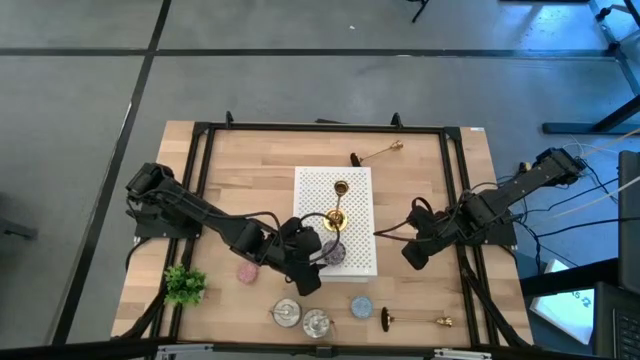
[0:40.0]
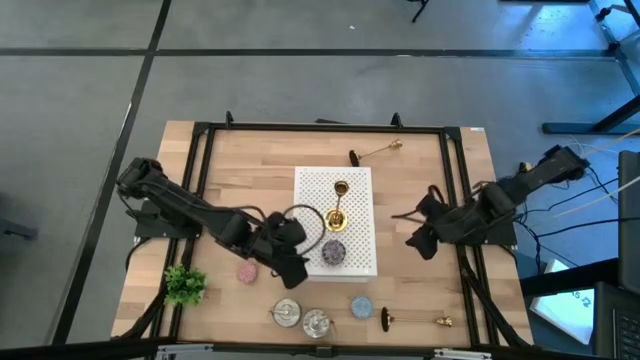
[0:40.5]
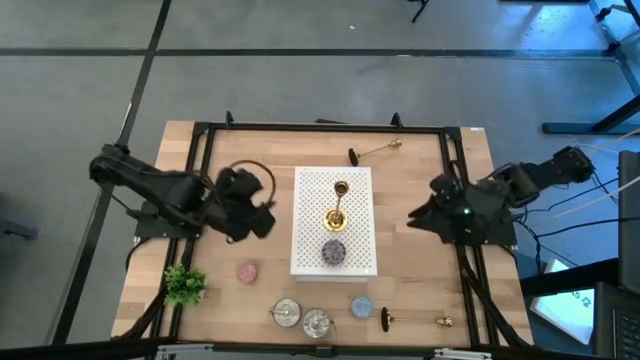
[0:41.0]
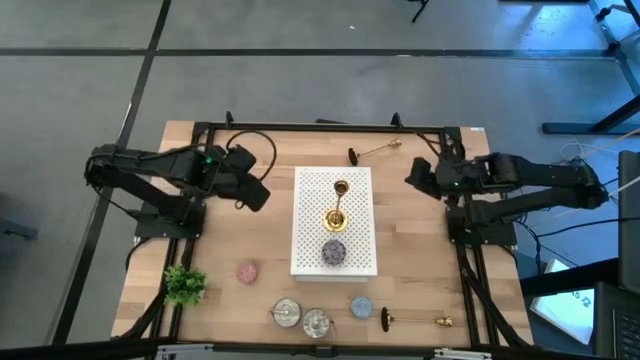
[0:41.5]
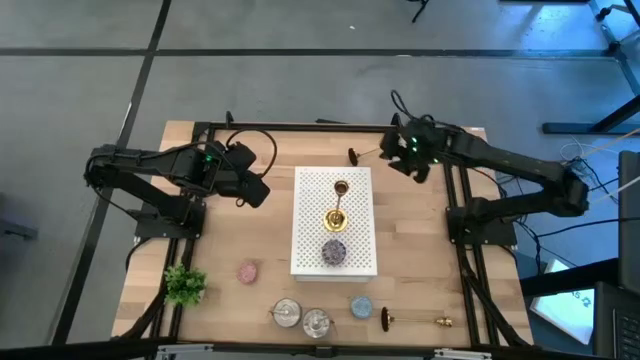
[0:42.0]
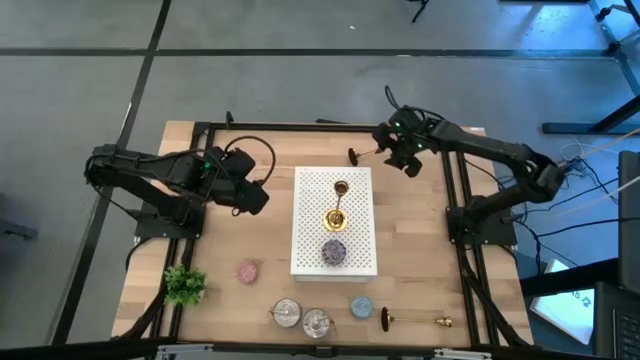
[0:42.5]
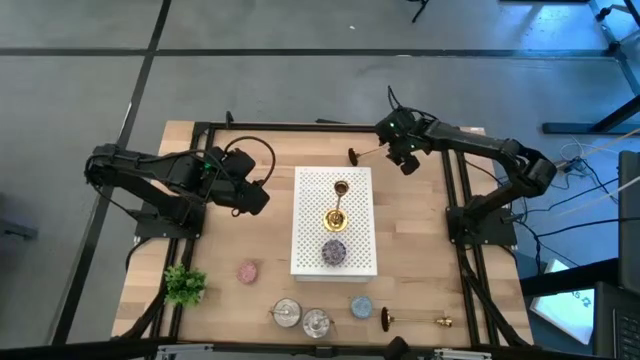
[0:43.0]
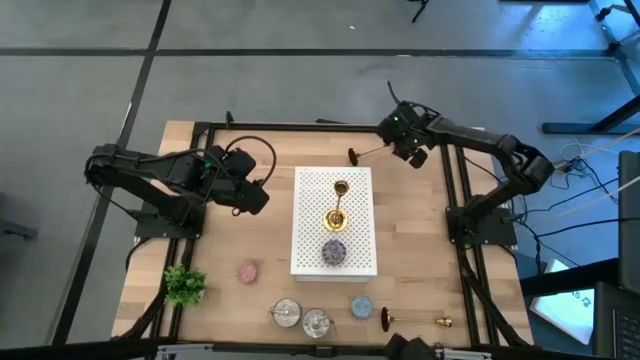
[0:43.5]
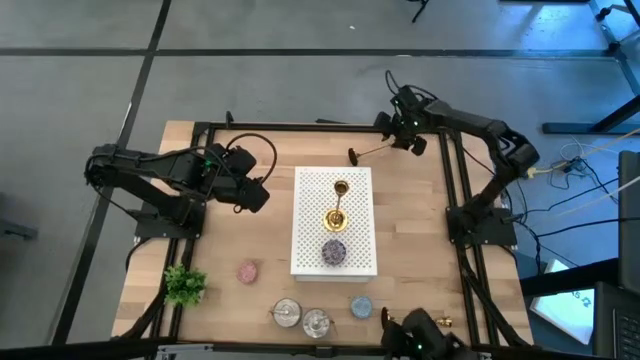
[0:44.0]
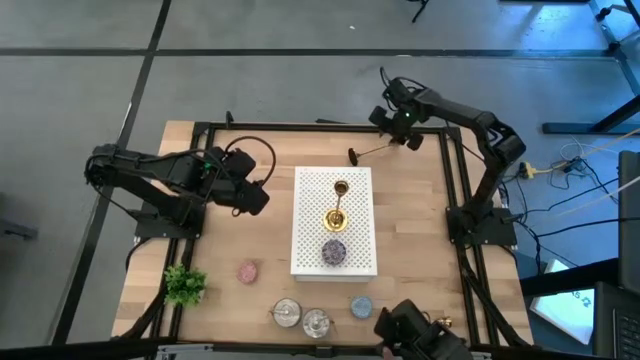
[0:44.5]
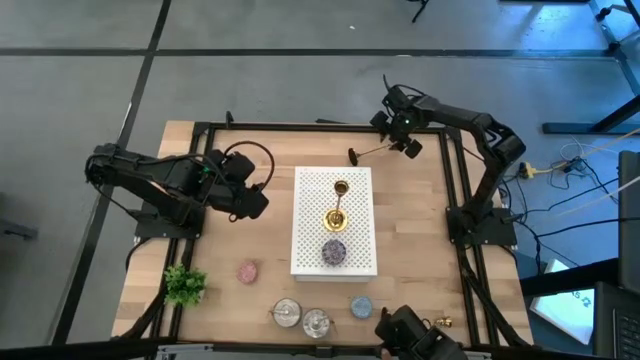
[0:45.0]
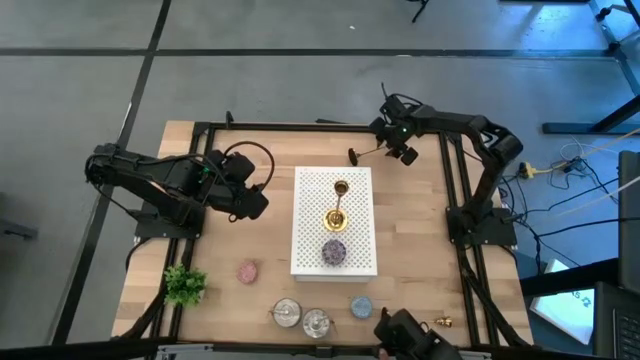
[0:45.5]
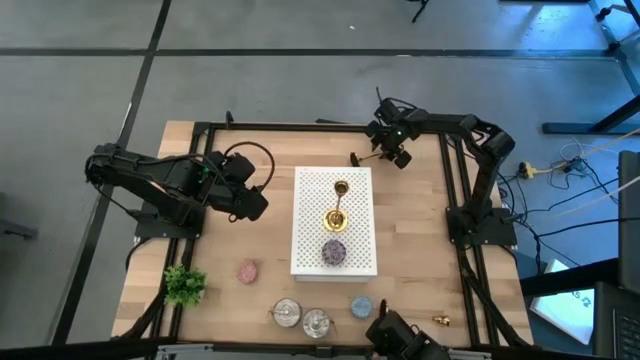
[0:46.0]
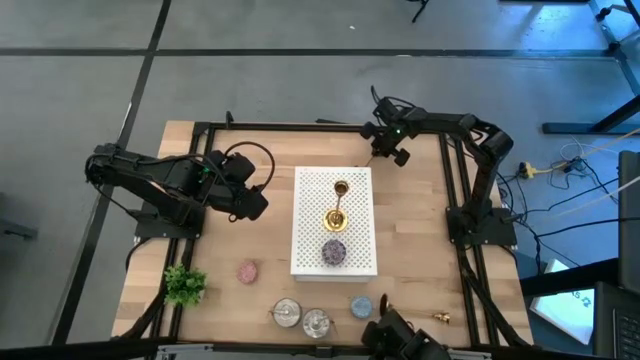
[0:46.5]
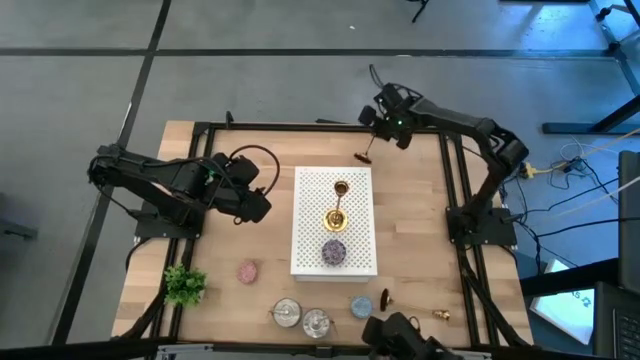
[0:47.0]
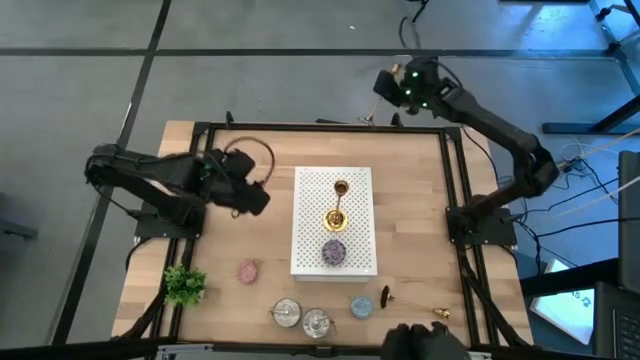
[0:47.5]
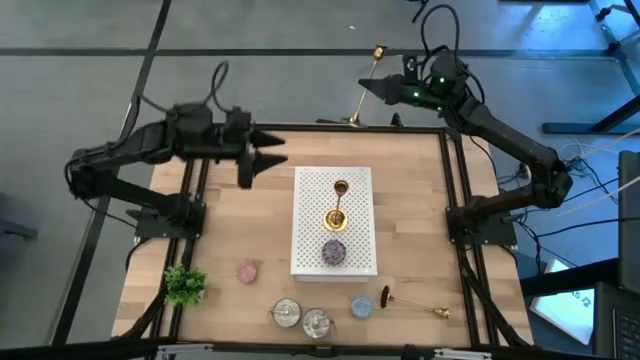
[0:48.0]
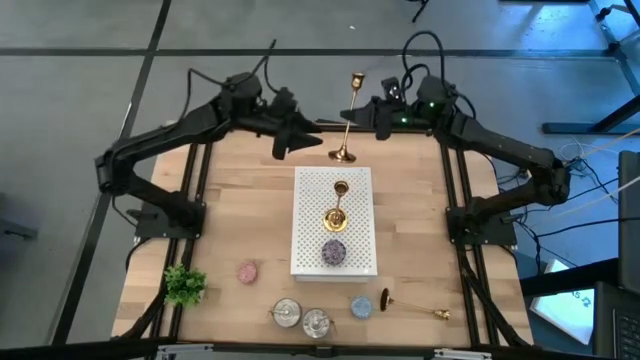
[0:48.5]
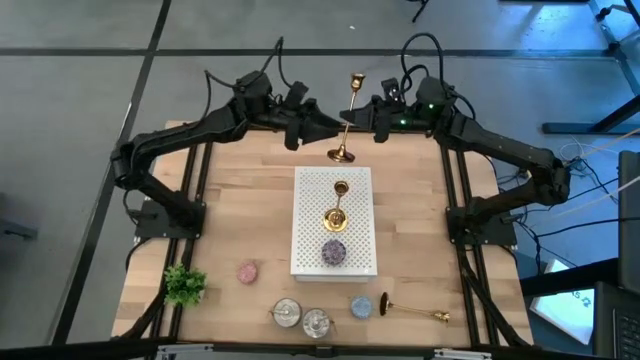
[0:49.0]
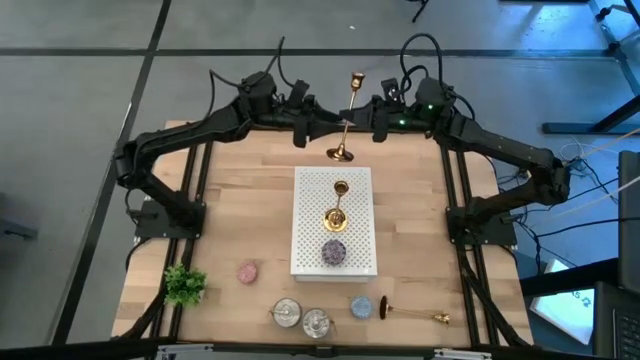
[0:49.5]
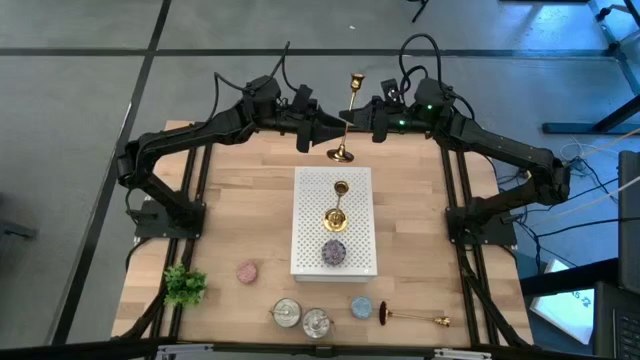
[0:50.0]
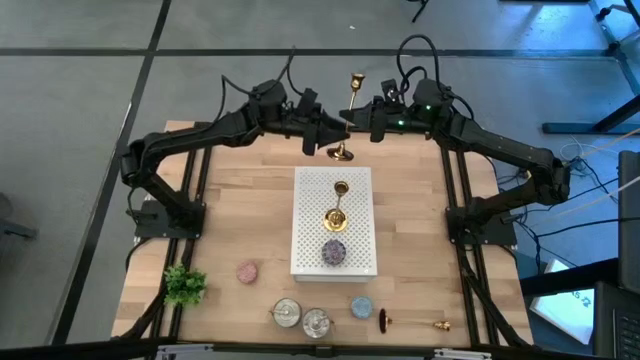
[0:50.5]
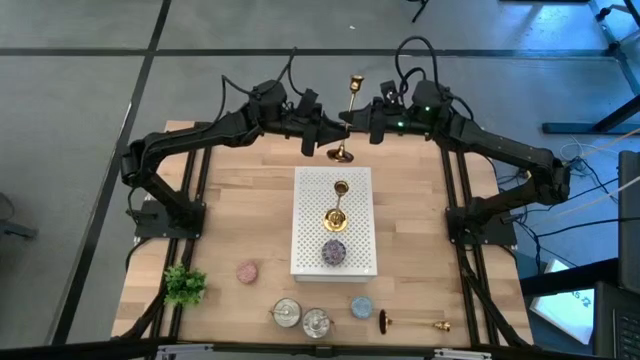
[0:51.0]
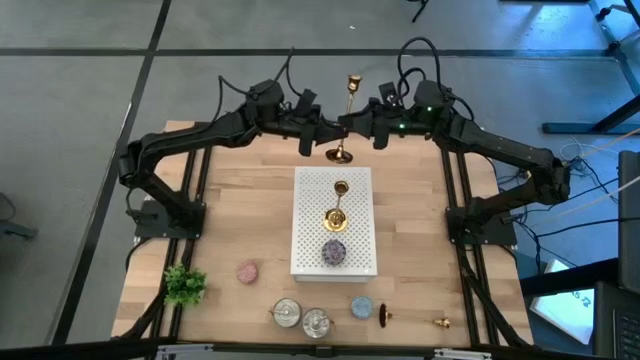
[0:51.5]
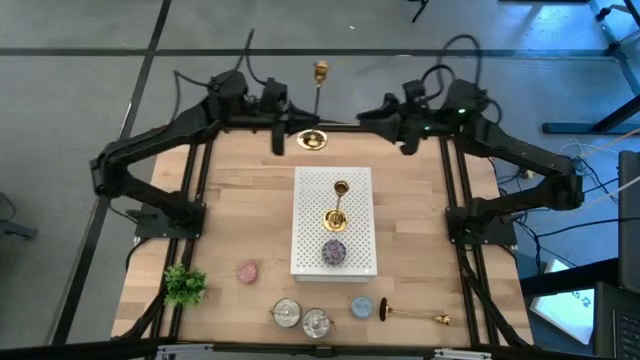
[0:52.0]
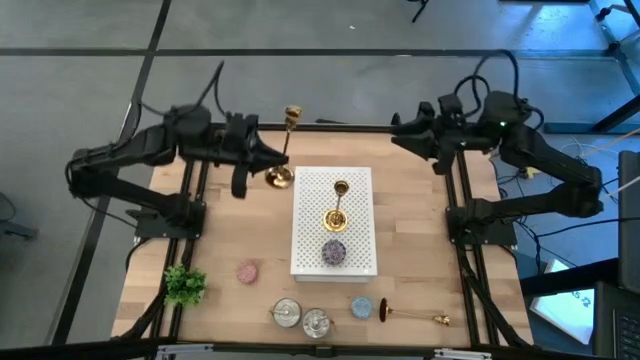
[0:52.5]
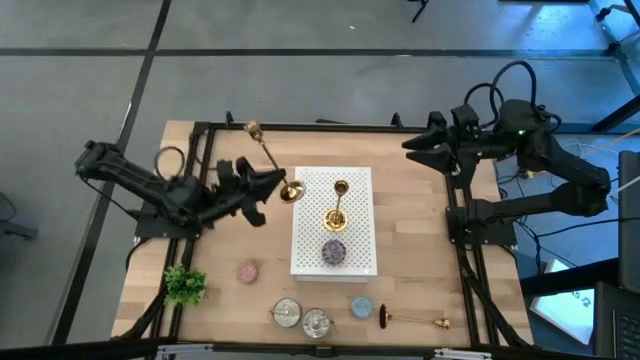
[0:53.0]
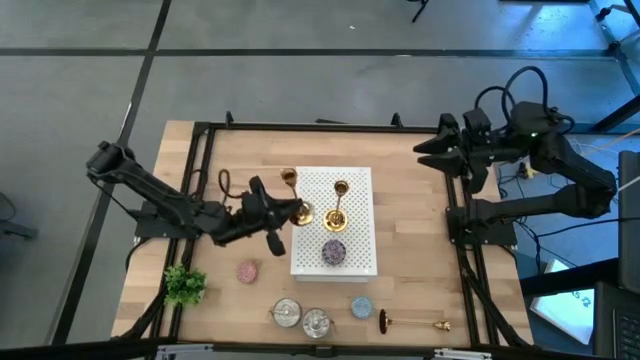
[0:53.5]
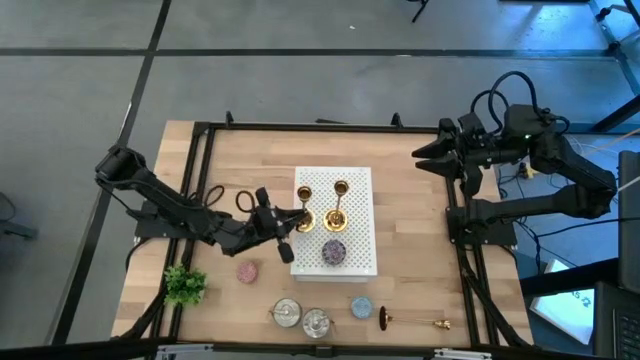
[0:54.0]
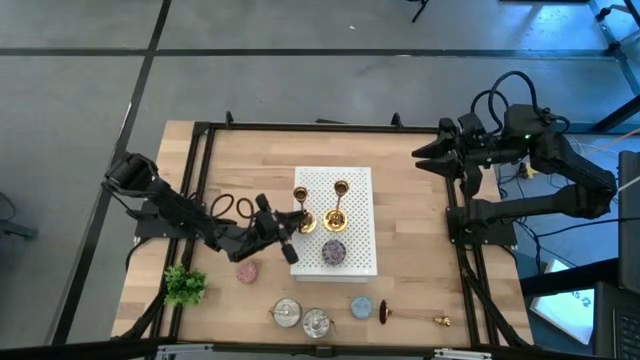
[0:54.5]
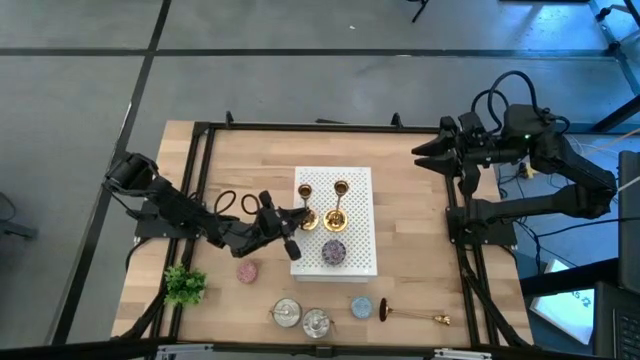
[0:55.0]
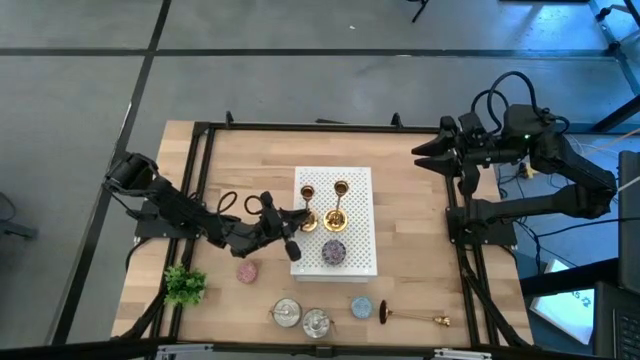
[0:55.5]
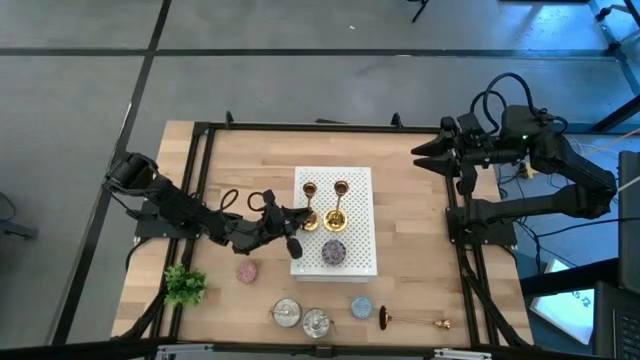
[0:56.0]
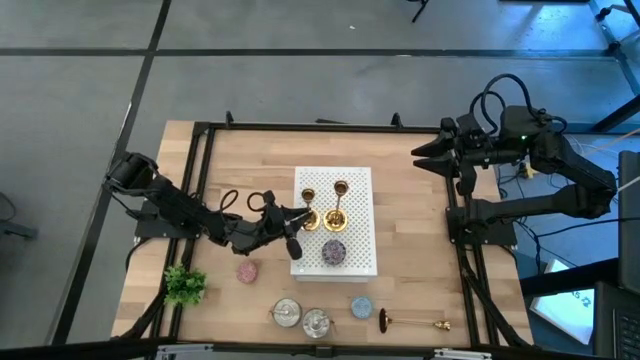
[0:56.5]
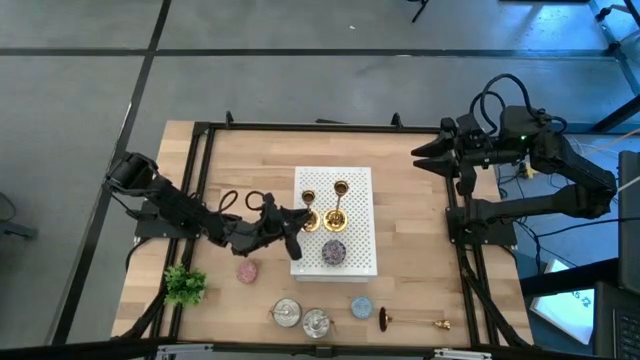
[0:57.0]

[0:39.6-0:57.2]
Task: Pick & Place candle stick holders
Put the top gold candle holder on the shelf aligned with the other gold candle holder

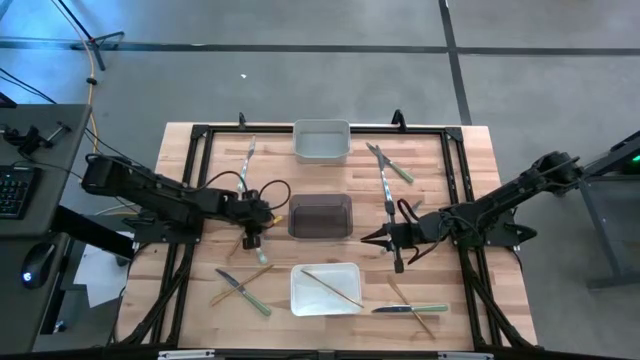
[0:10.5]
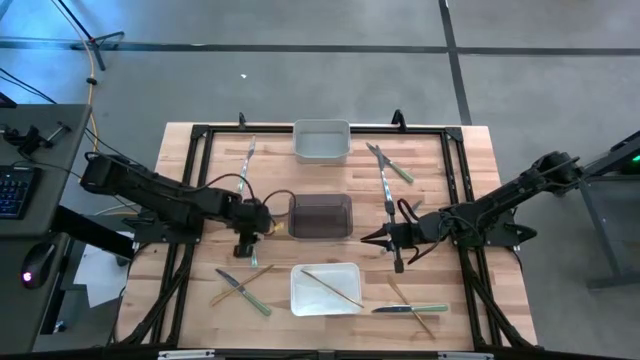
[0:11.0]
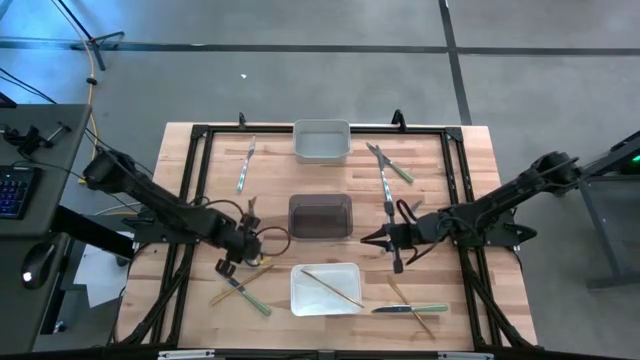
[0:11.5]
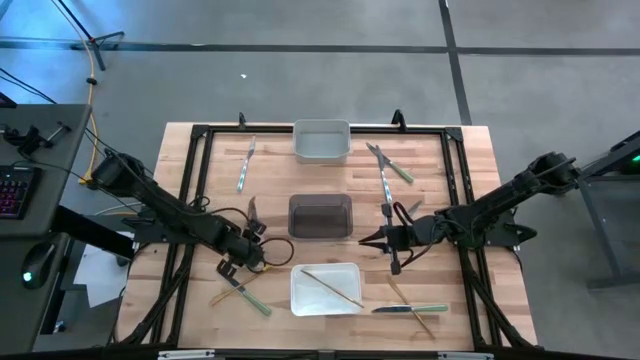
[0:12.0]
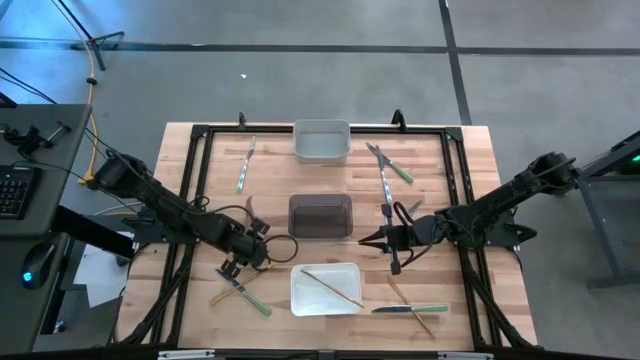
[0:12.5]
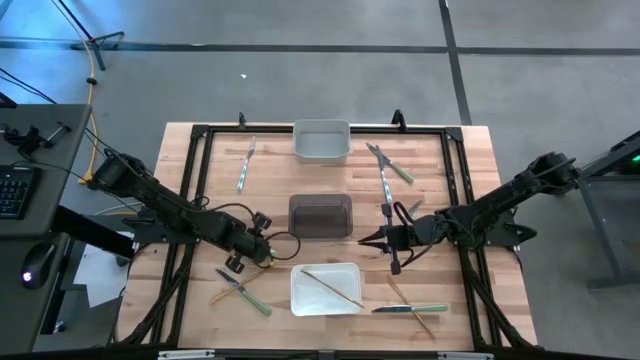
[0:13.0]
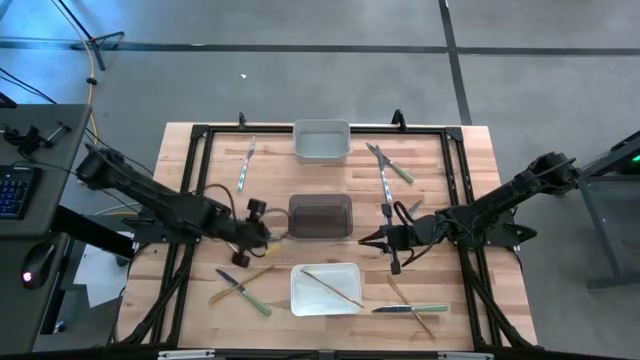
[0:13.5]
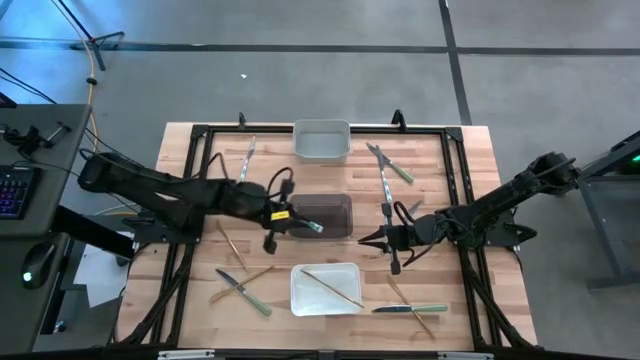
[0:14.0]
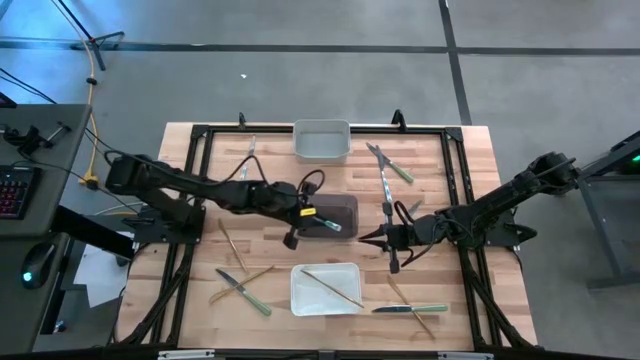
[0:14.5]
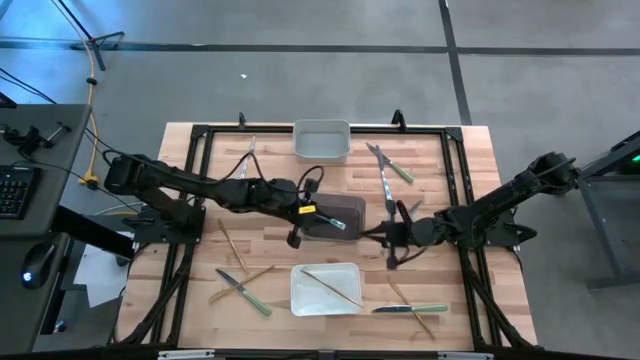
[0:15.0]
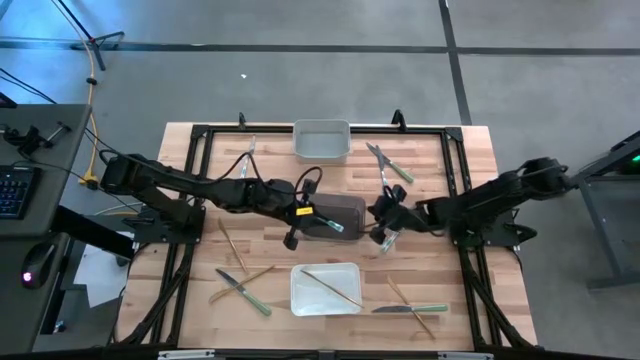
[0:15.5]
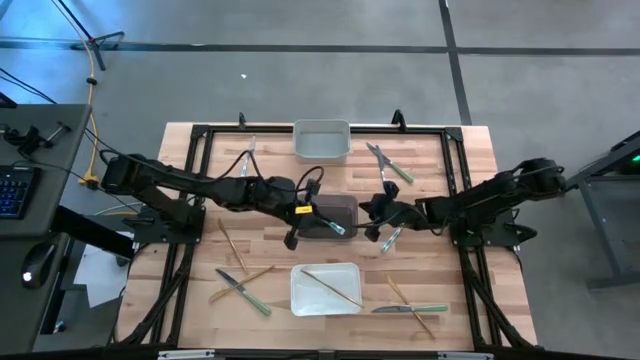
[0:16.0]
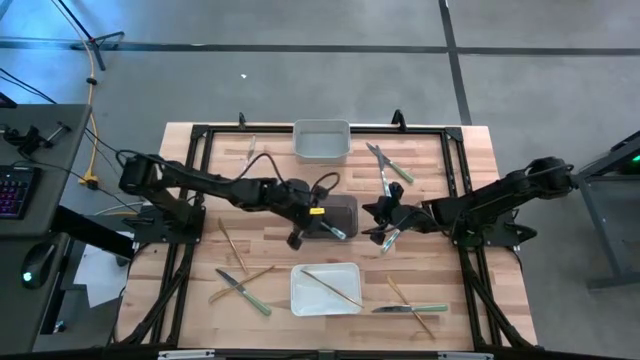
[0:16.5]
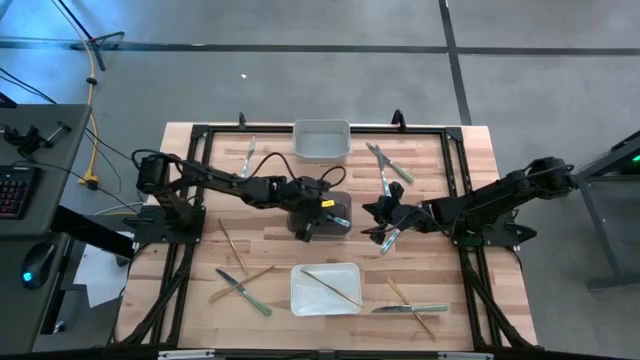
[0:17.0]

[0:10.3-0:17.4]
Task: Sort silverware by color (type)
Put the blue patterned table knife into the black bin
